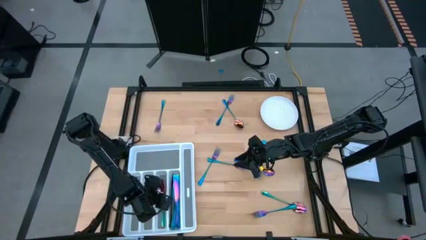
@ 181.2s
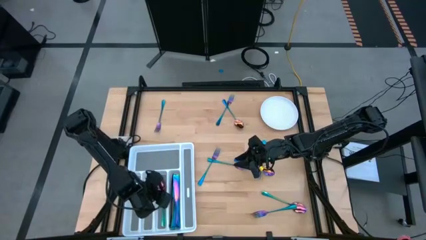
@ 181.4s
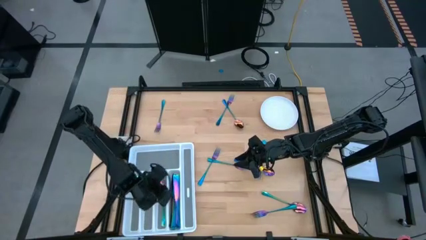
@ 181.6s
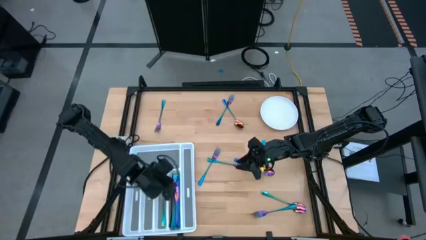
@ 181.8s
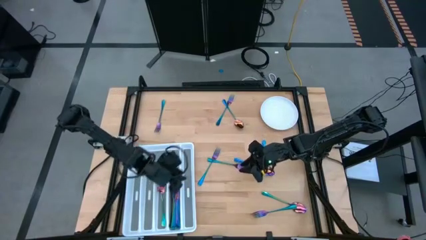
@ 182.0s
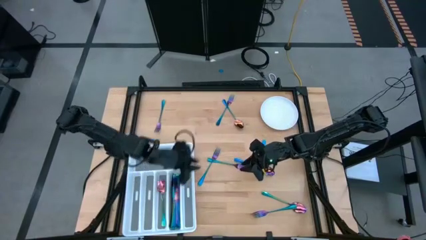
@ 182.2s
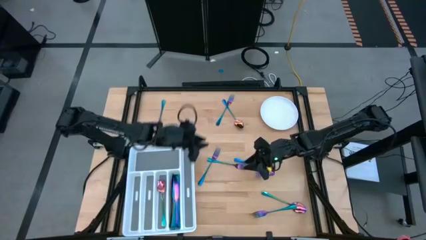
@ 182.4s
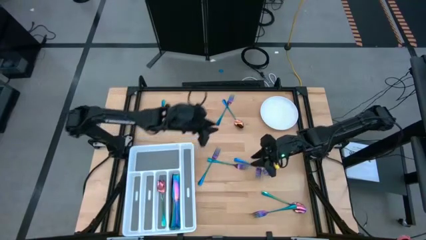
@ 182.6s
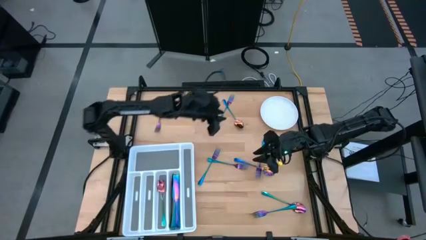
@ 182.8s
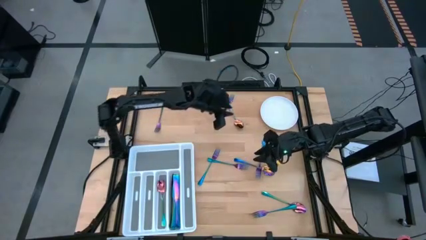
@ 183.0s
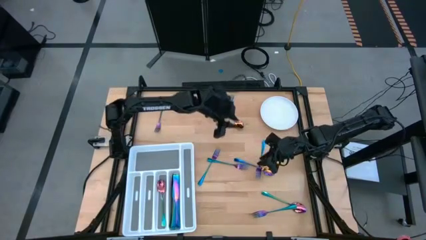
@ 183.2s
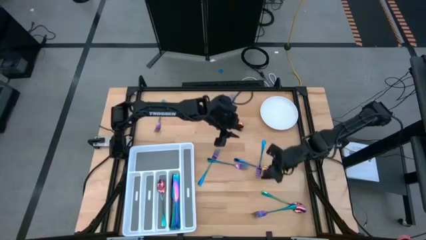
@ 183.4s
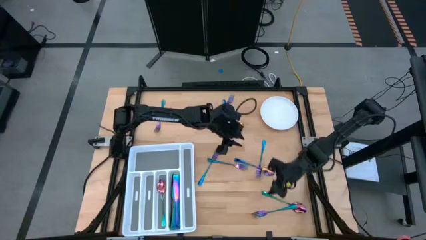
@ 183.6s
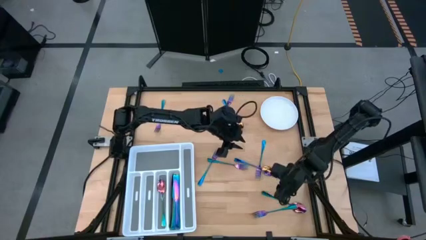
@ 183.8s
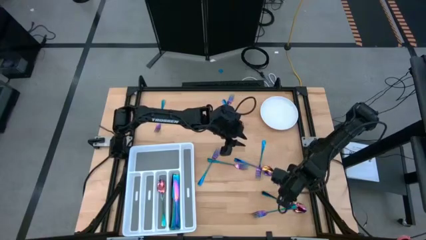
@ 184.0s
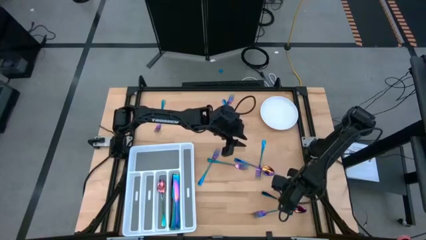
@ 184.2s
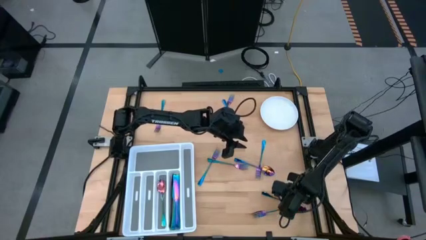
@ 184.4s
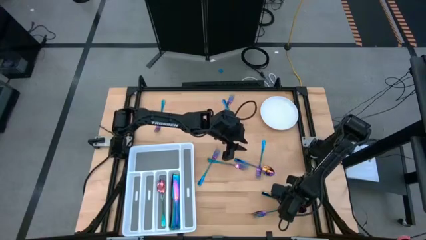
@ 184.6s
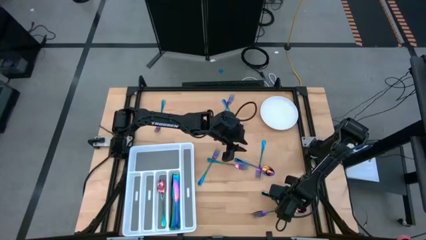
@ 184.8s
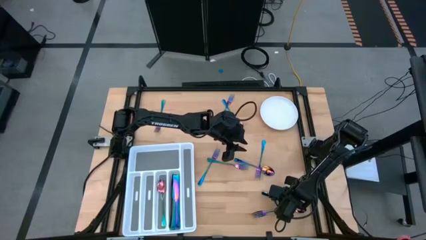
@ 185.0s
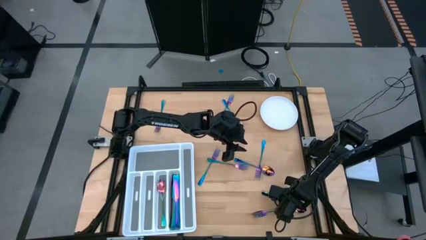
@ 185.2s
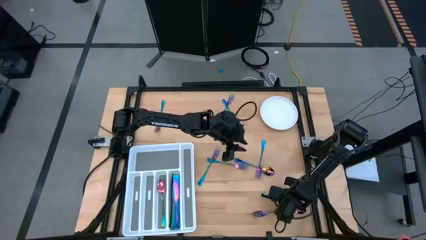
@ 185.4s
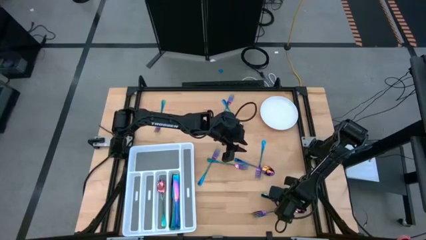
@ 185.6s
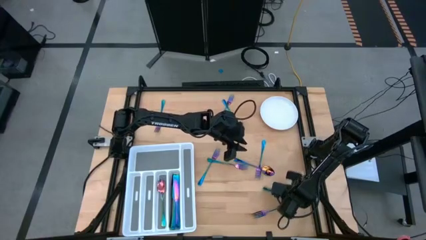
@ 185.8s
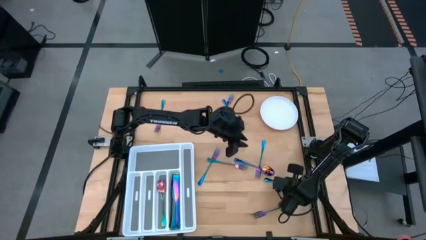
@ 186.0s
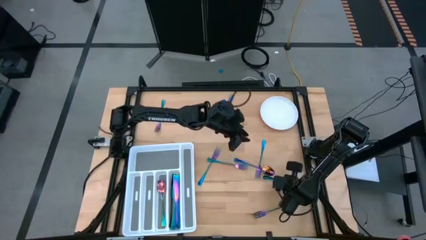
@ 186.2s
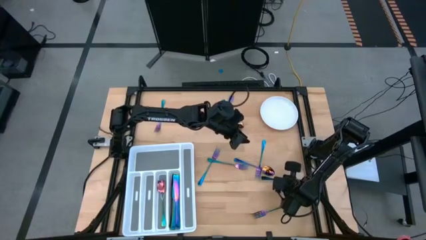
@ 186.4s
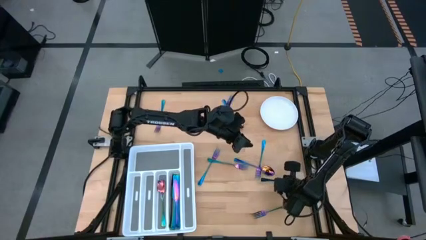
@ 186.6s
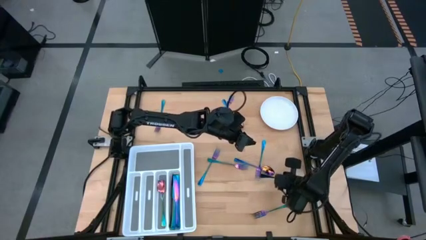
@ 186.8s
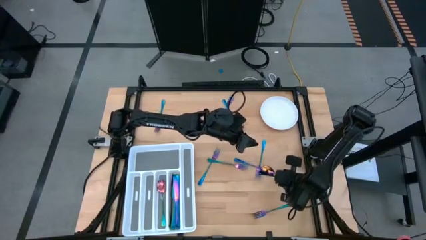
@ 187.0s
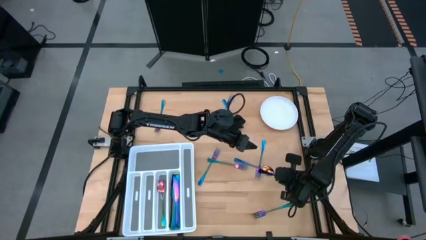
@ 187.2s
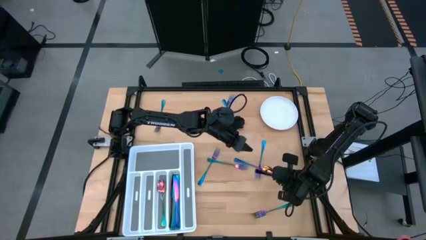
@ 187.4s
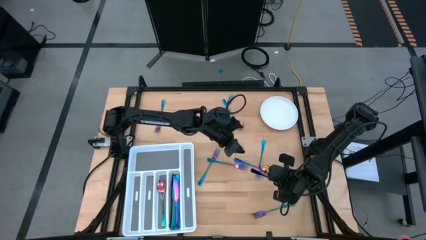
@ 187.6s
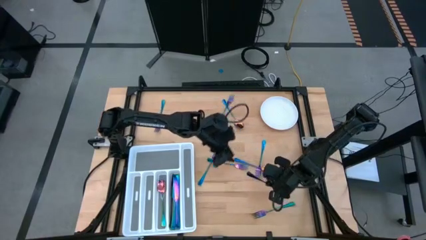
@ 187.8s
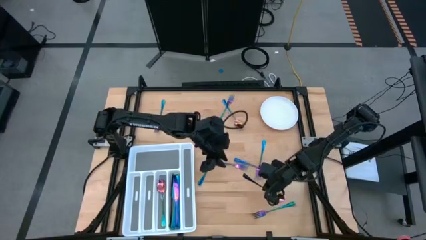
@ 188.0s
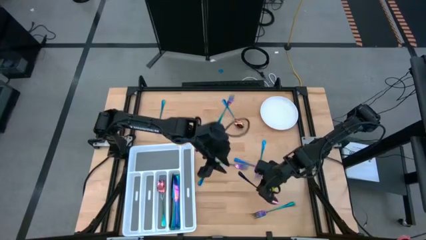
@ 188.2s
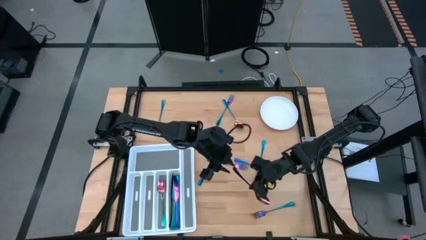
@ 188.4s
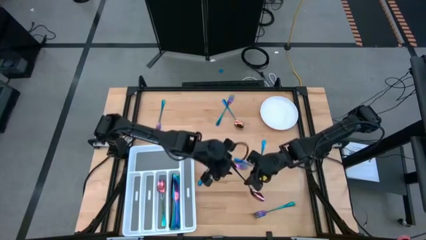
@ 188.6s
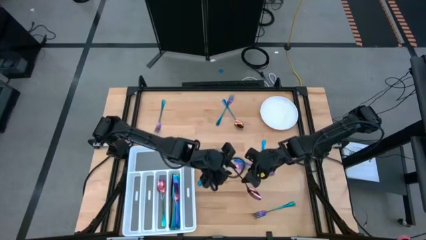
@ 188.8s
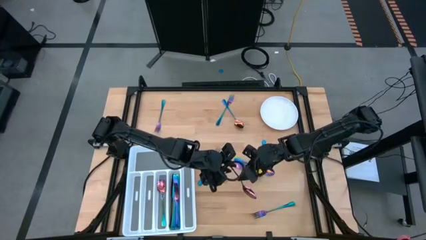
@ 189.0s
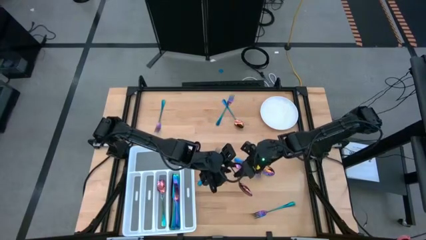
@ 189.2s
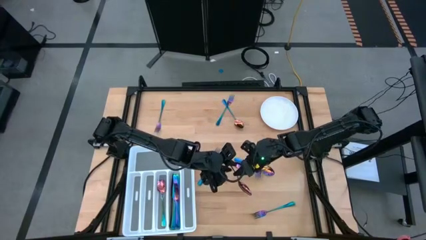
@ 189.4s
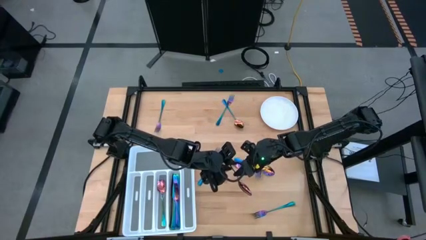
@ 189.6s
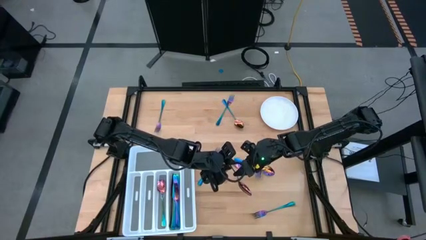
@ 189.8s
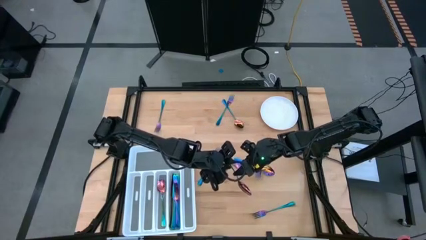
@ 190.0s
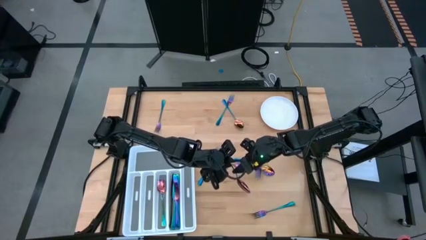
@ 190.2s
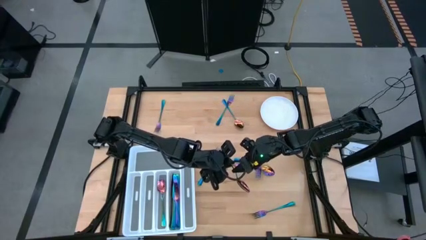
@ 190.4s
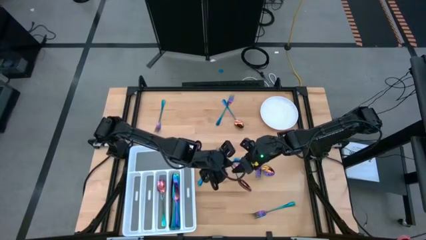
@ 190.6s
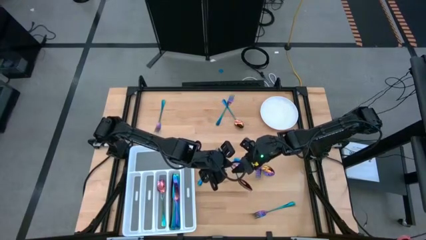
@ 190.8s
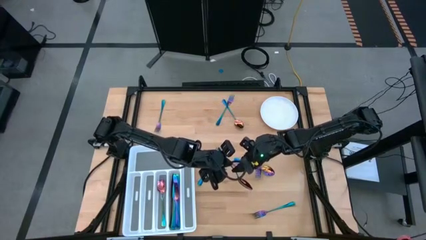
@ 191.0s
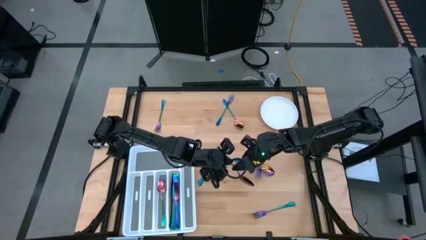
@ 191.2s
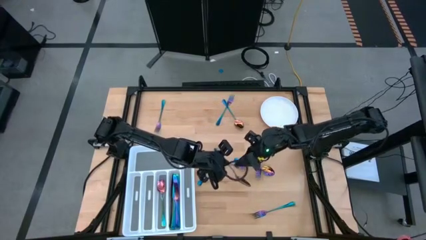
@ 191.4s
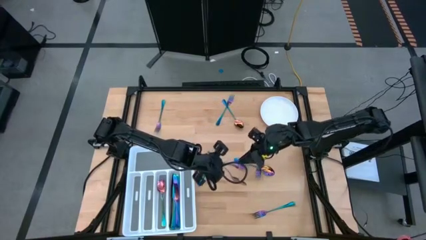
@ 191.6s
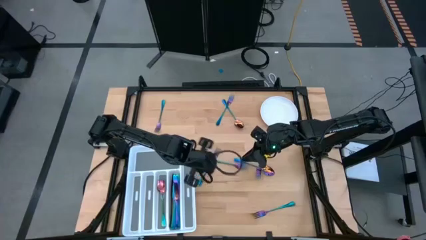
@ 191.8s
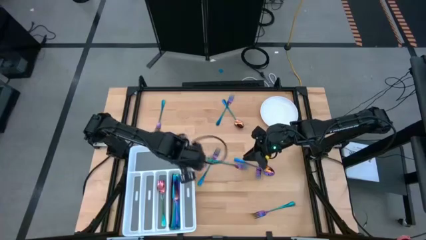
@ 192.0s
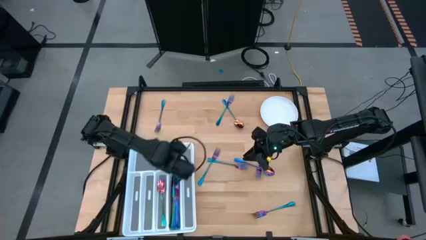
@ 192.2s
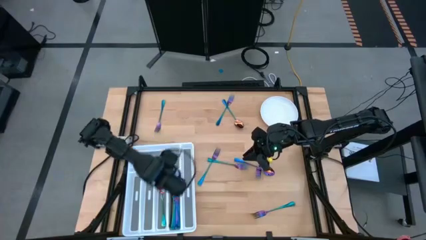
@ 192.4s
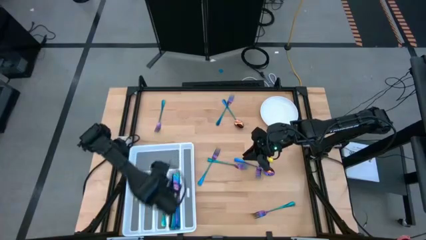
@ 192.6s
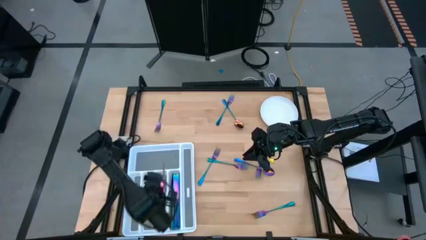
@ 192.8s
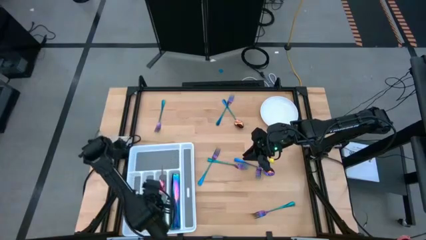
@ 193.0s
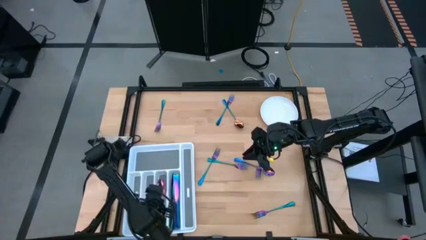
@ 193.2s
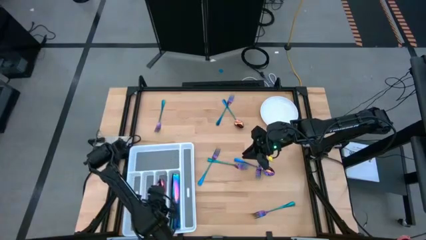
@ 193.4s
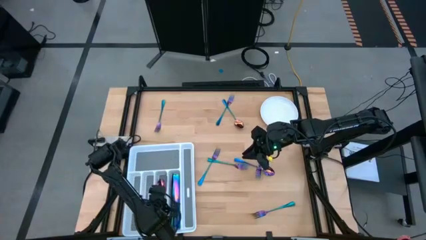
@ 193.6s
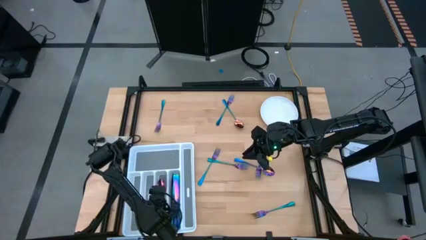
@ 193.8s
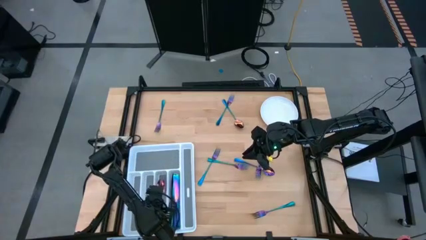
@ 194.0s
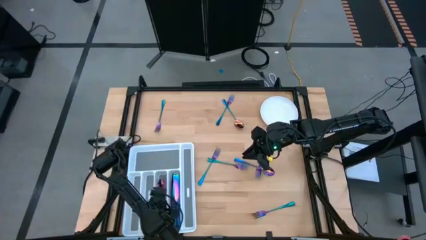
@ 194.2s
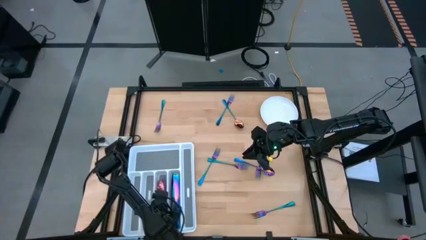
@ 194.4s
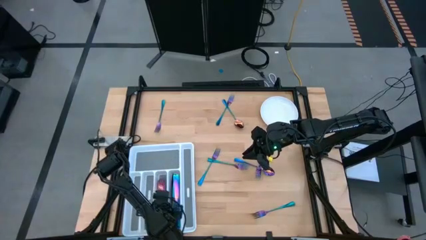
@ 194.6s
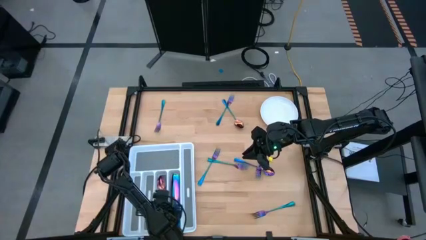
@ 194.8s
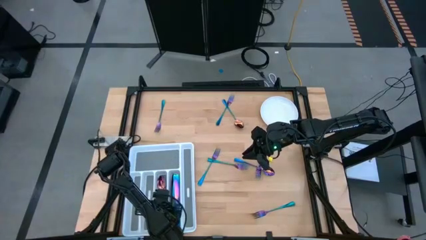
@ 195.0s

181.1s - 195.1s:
Task: Sort silverware
Put the bottom right iridescent spoon into the cutlery tray

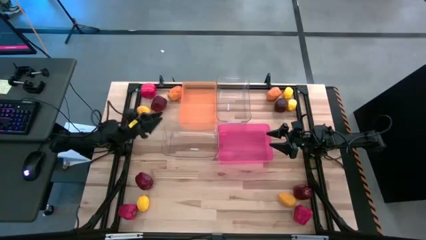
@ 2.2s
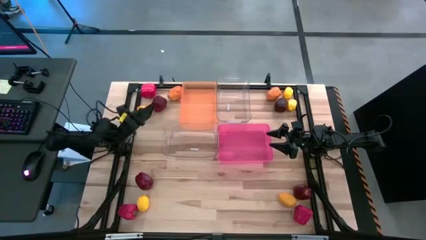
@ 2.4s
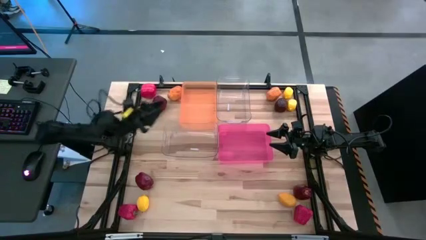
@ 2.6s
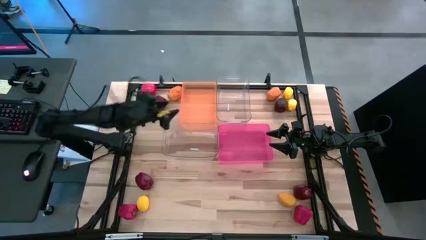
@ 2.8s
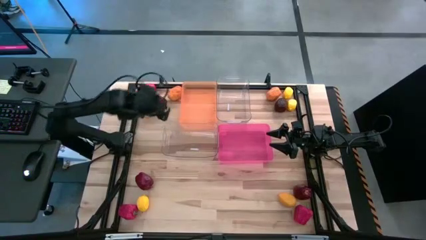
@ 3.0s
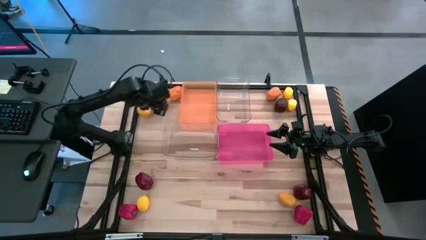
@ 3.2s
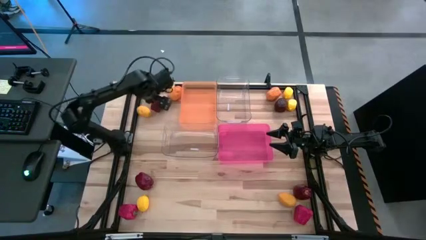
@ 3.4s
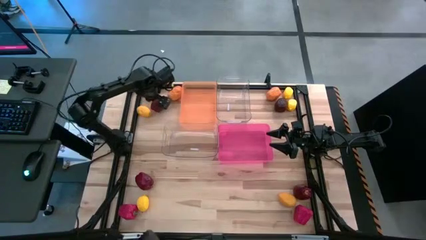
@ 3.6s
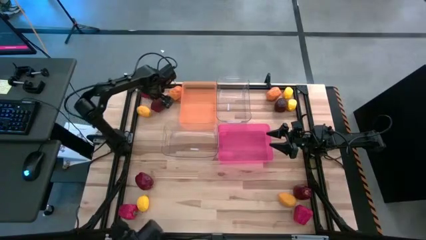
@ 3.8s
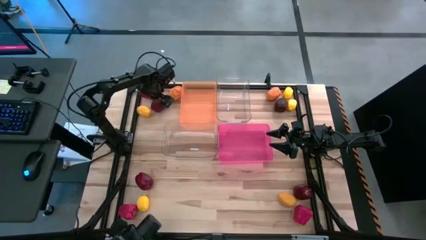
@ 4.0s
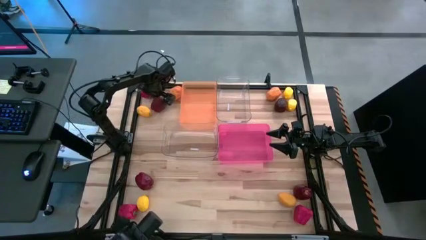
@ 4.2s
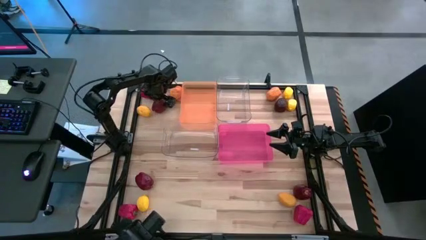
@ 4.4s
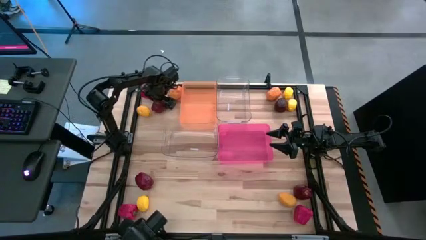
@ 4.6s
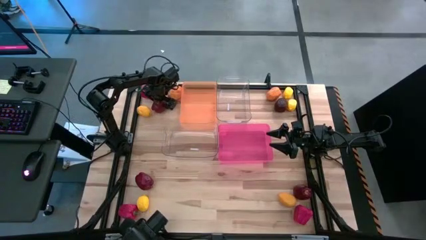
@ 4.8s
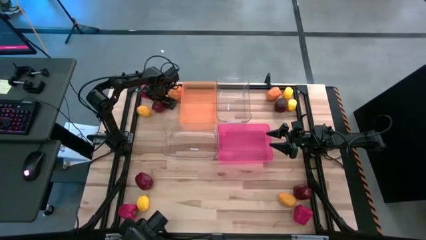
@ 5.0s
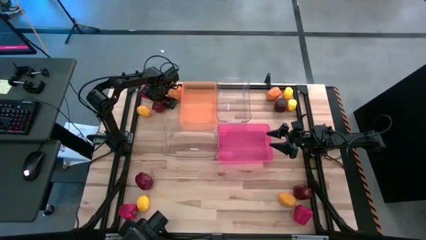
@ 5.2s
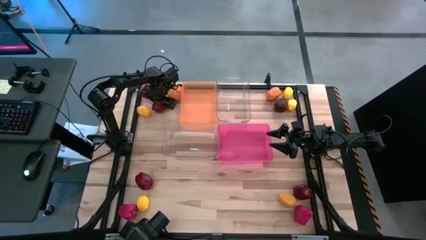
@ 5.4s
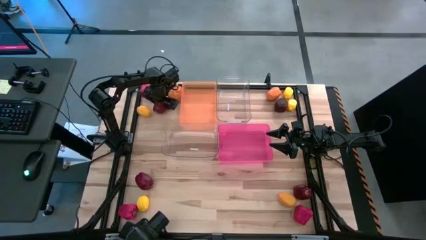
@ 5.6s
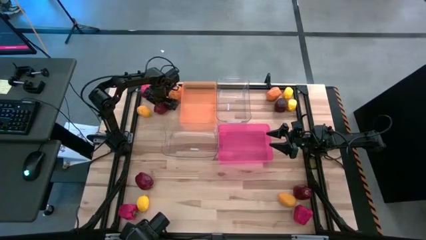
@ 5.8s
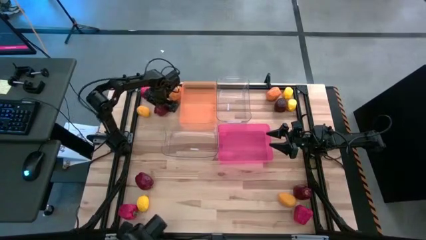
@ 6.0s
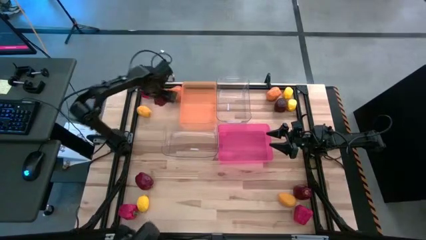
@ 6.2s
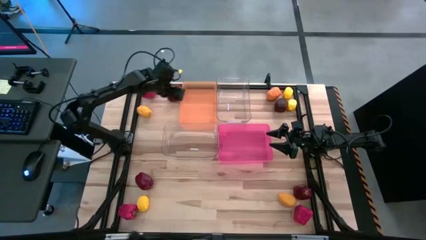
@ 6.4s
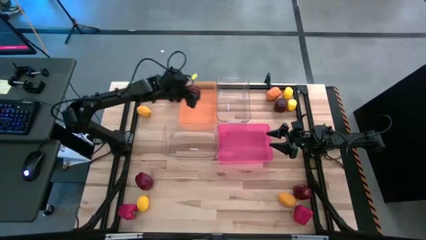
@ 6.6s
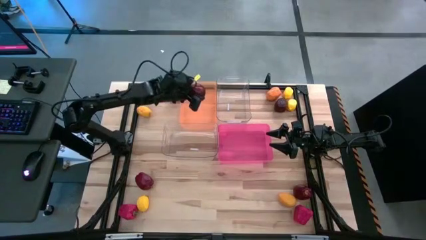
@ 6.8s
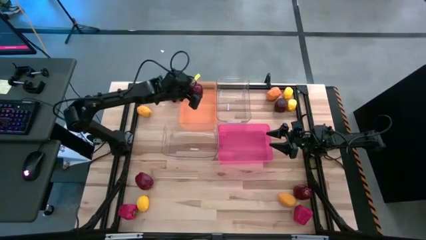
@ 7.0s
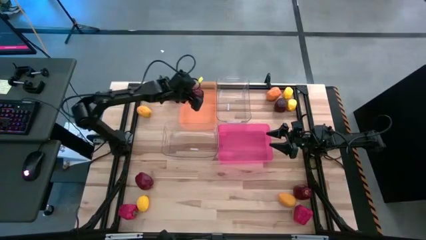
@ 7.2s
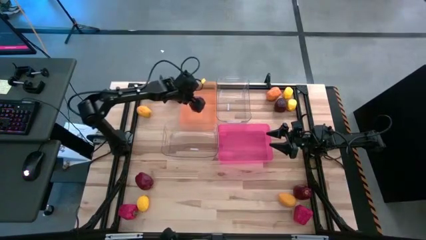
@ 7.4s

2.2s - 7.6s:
Task: Sort produce into baskets
Put the red apple into the orange bin
